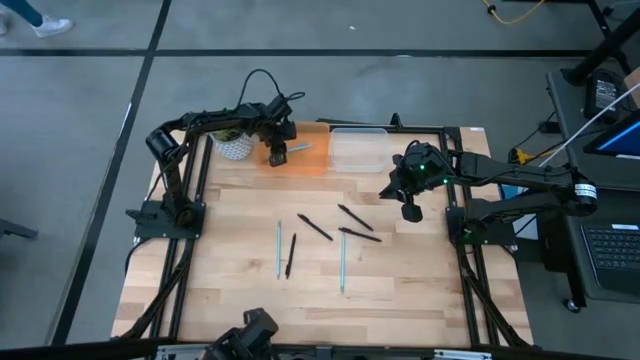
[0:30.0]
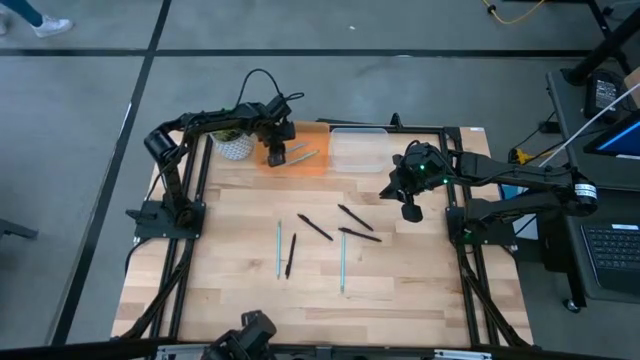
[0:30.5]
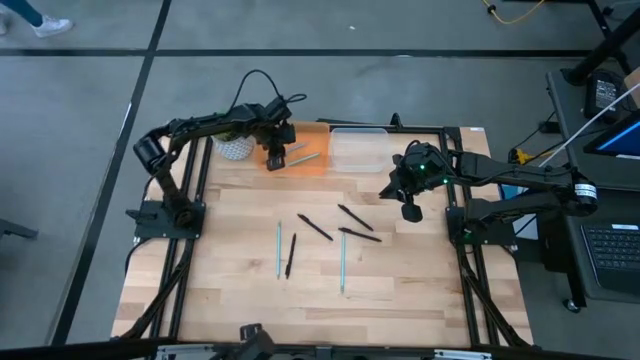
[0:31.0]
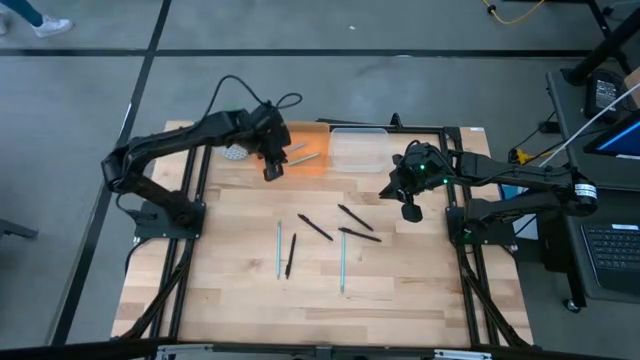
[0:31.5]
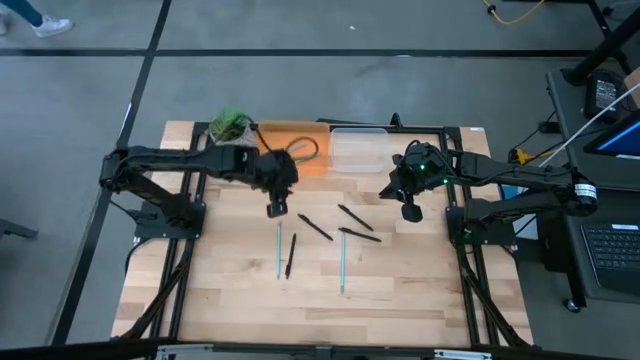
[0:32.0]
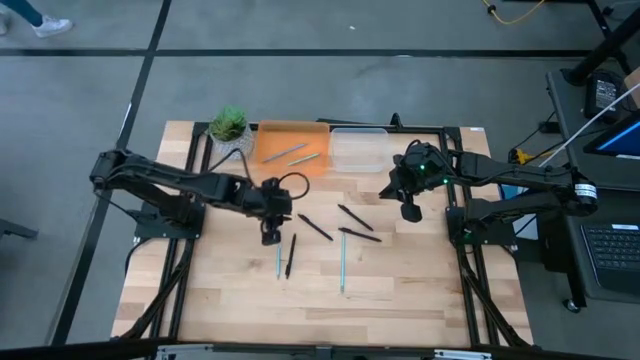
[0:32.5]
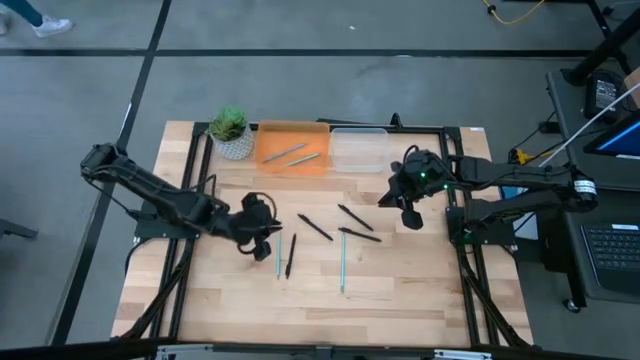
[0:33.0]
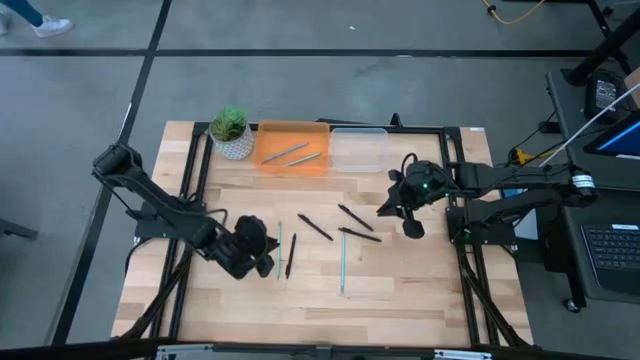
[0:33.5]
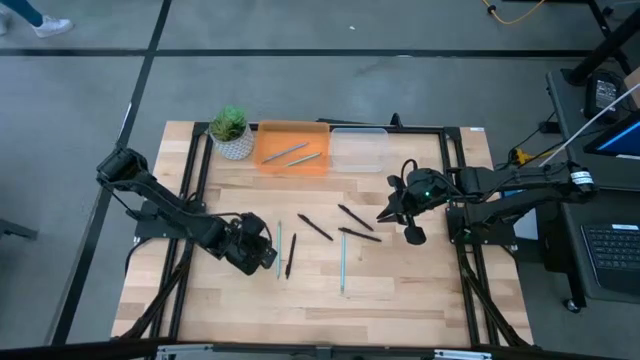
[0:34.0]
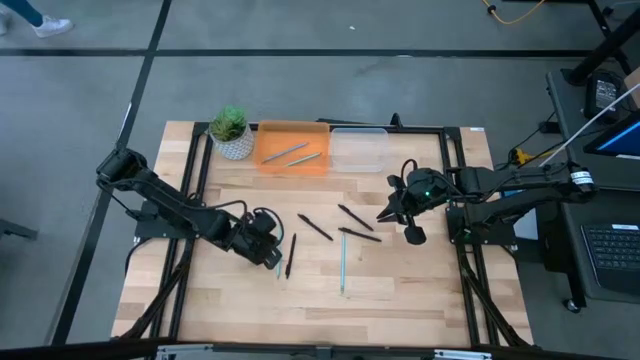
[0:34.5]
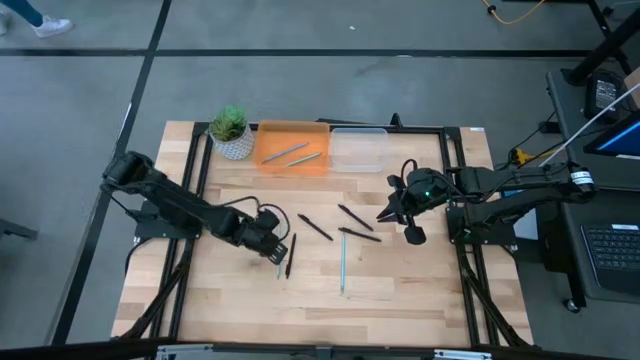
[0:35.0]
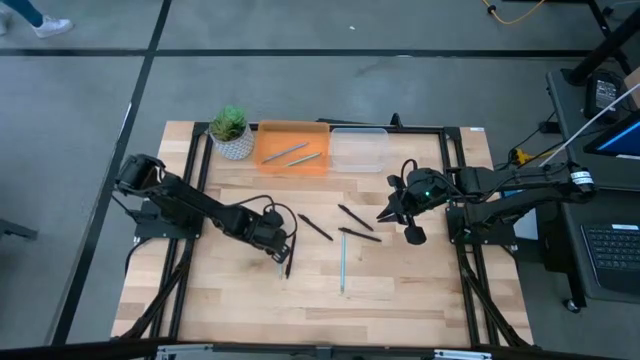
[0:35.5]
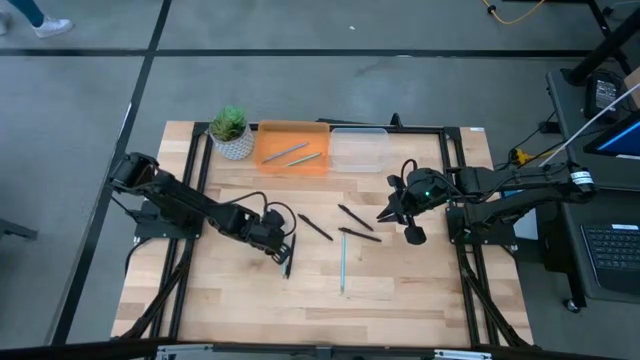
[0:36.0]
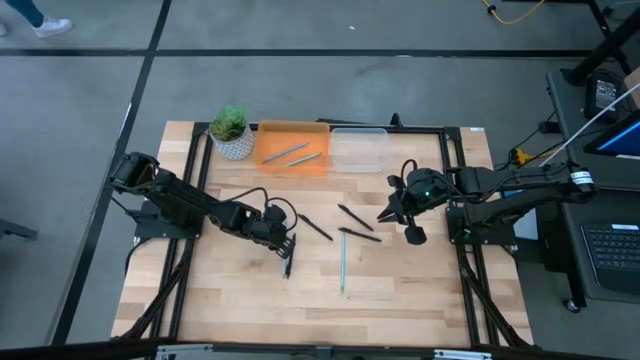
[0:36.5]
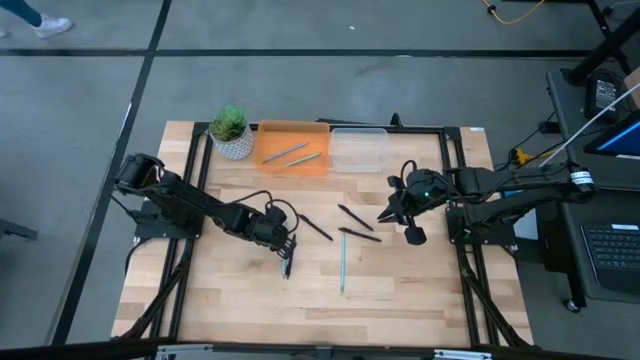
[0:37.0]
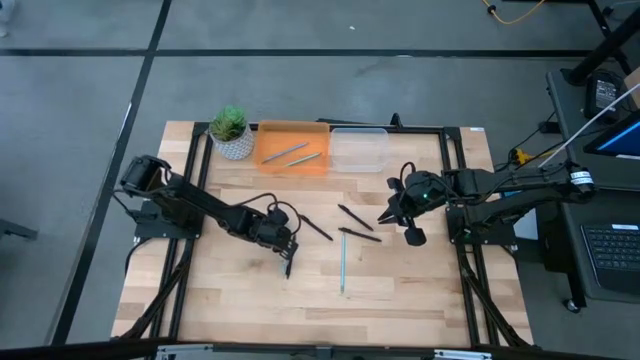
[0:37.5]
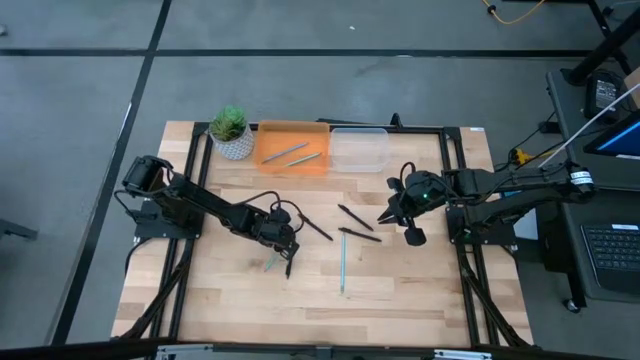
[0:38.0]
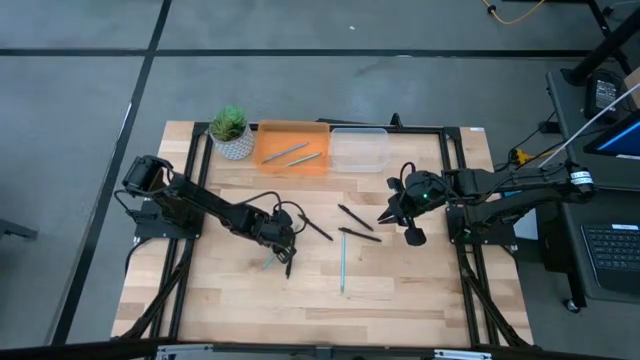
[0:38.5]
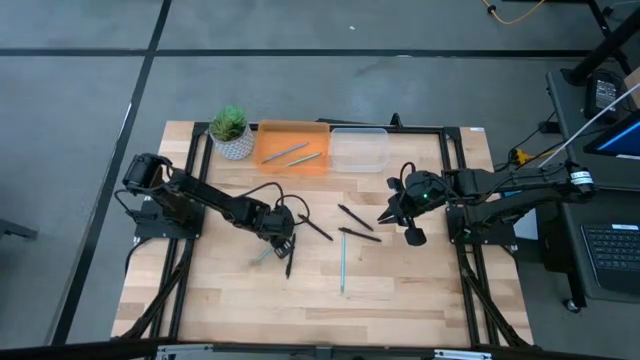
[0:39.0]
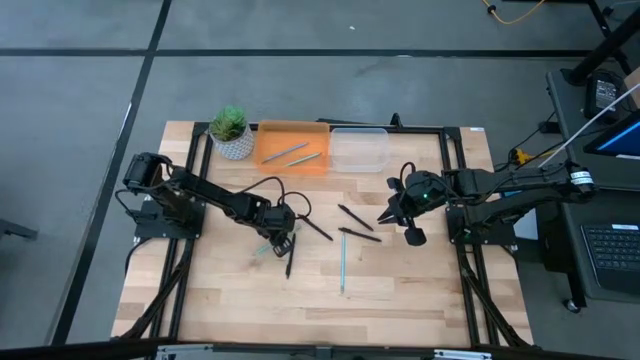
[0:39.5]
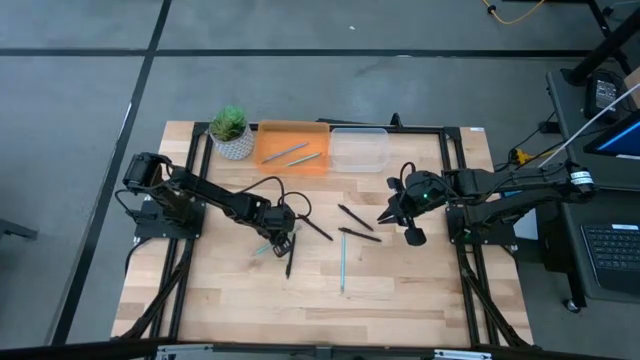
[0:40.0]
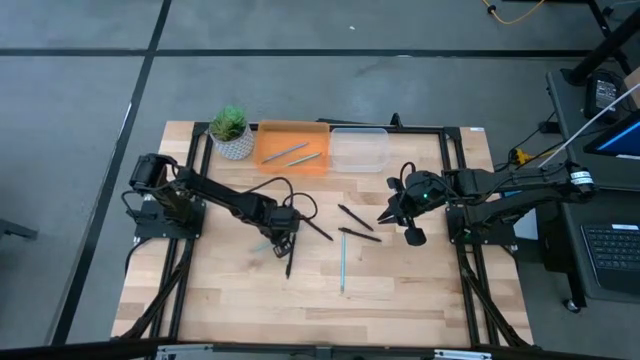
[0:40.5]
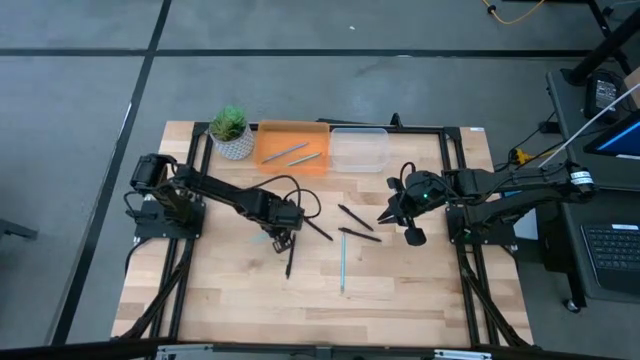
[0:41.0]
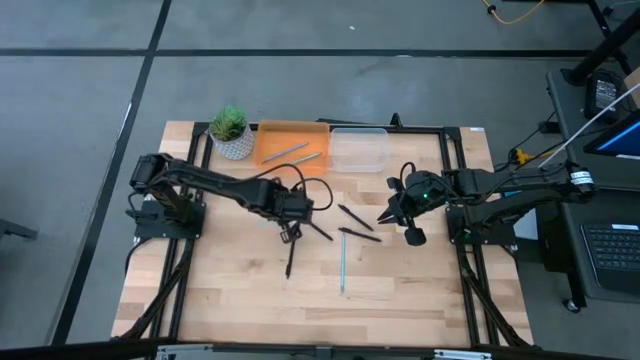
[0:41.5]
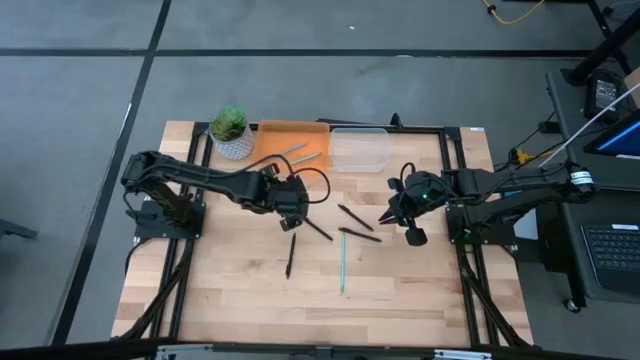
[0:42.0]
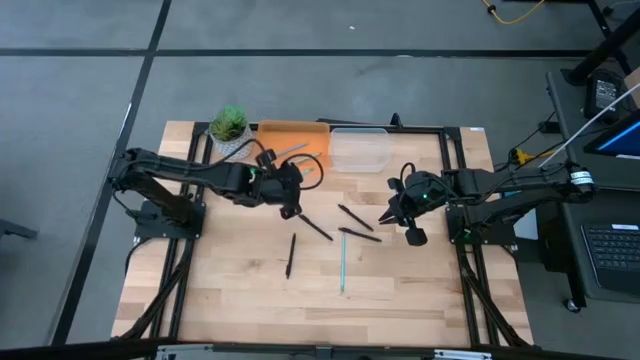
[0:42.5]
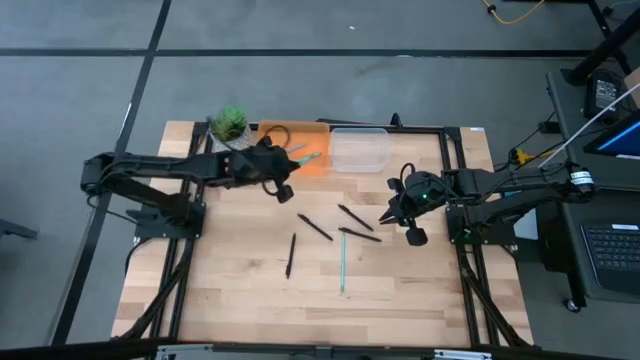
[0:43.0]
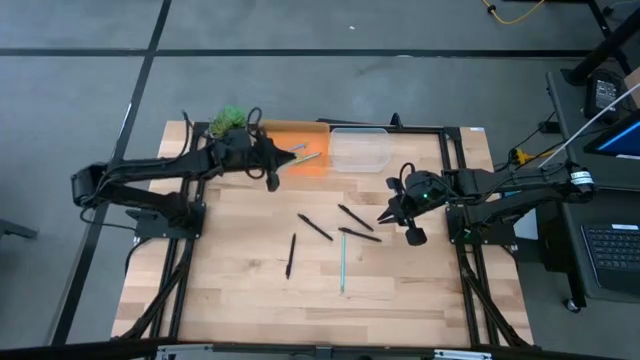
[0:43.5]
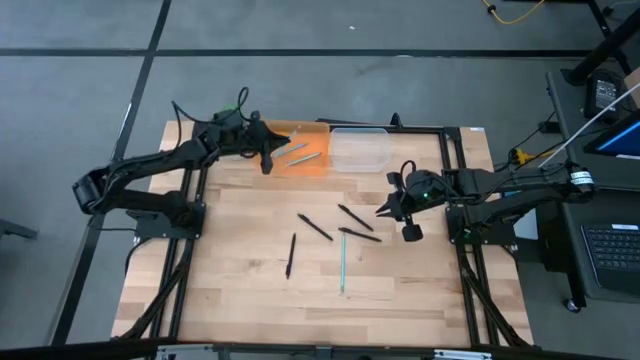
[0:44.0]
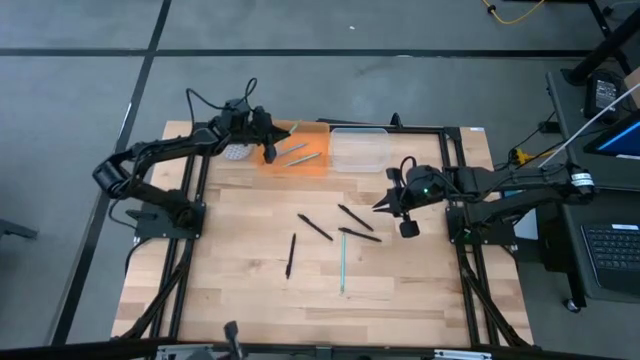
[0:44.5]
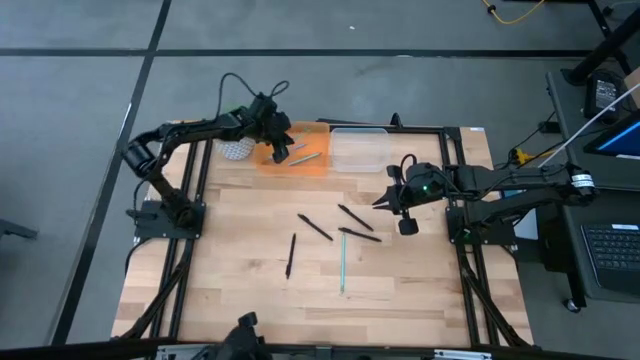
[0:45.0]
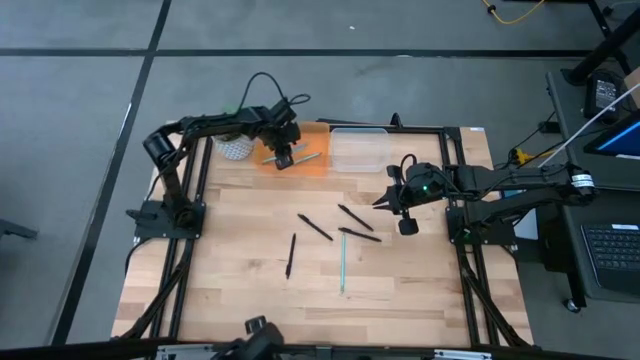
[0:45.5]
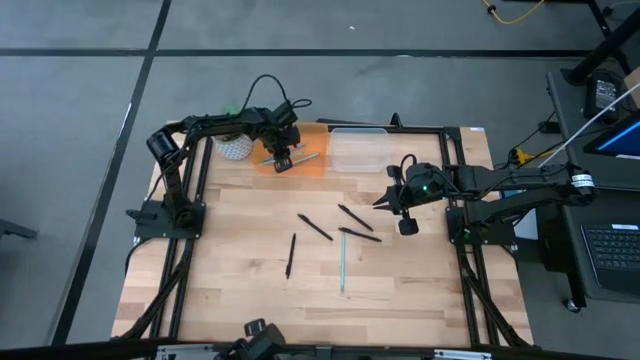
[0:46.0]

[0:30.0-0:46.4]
Task: Sort pens & pencils
Put the light blue pencil into the orange bin

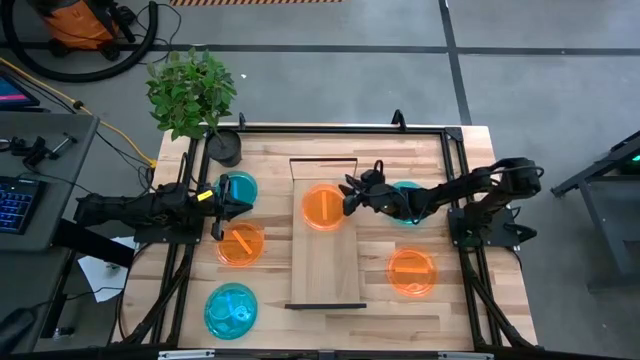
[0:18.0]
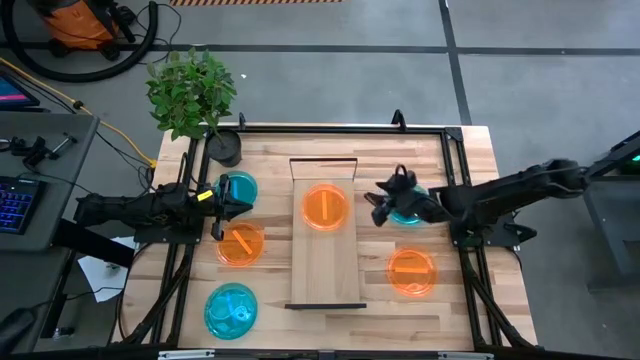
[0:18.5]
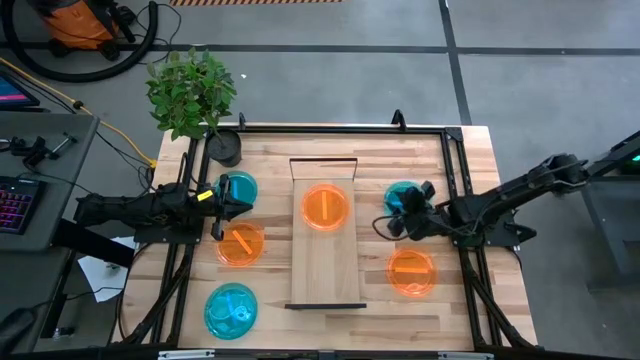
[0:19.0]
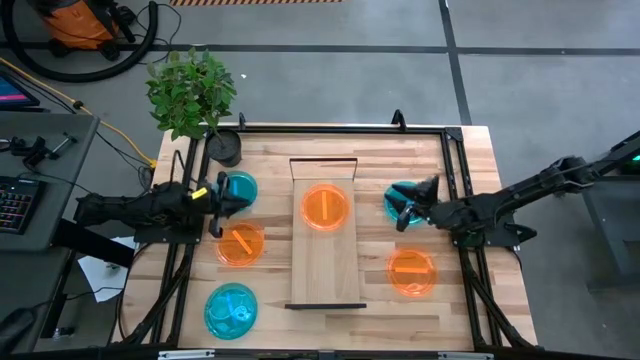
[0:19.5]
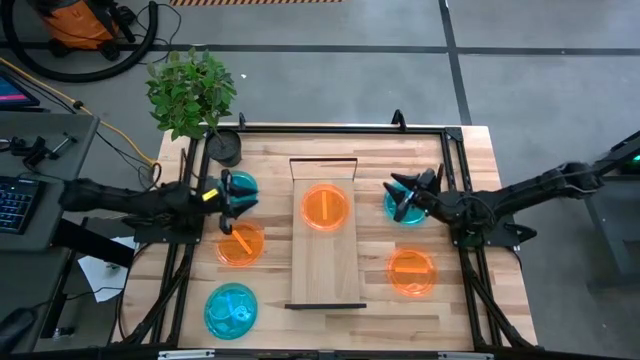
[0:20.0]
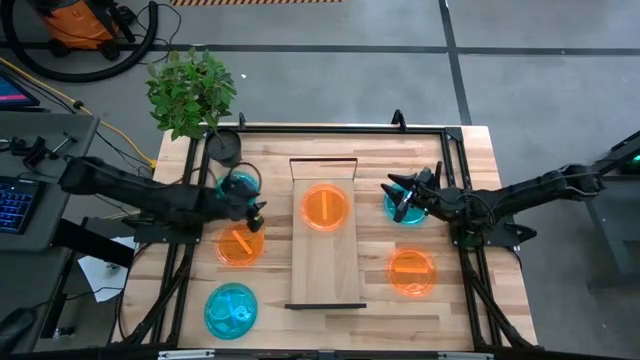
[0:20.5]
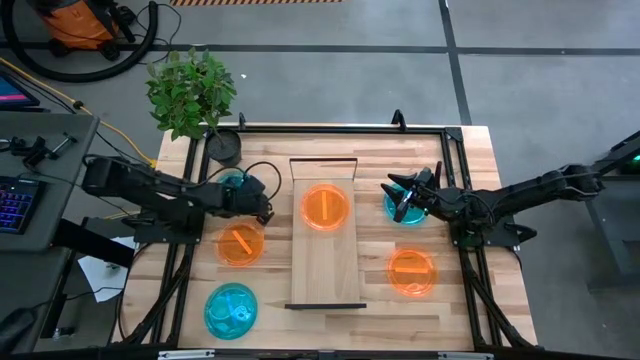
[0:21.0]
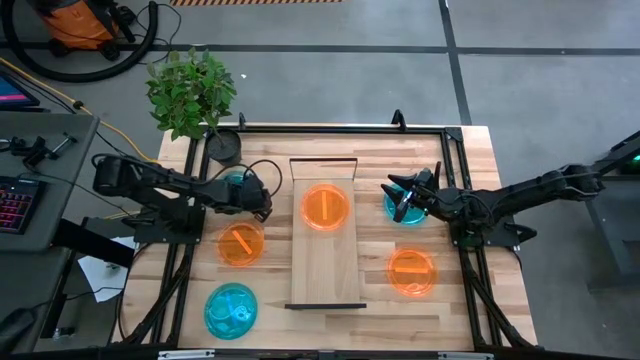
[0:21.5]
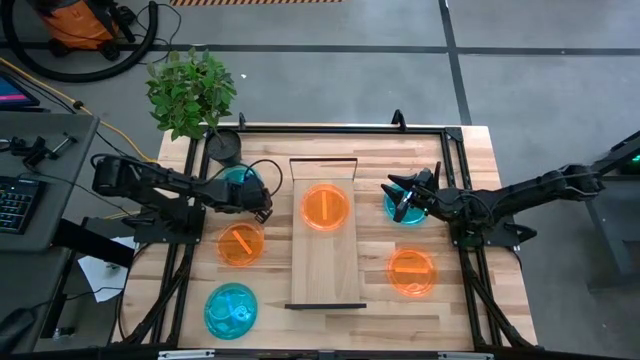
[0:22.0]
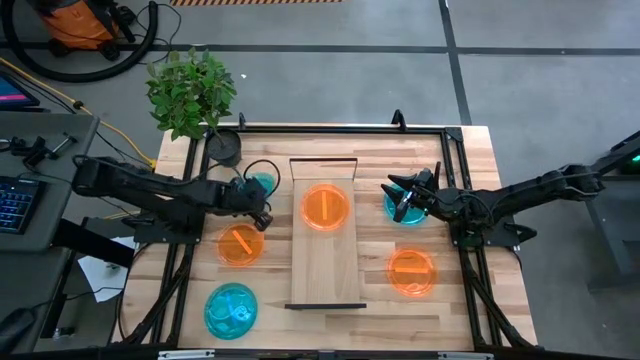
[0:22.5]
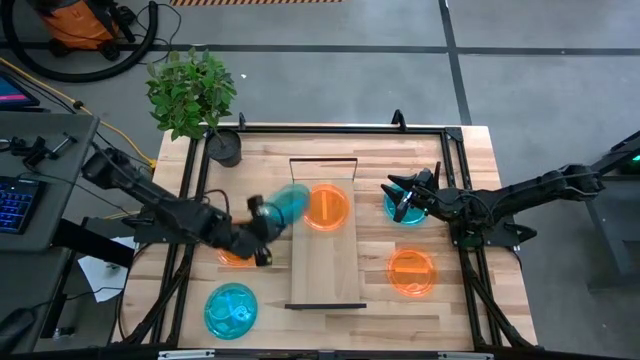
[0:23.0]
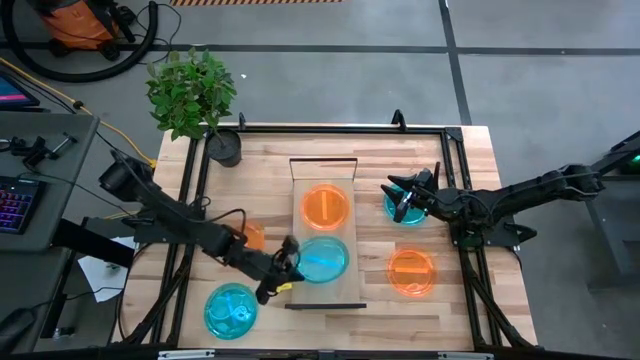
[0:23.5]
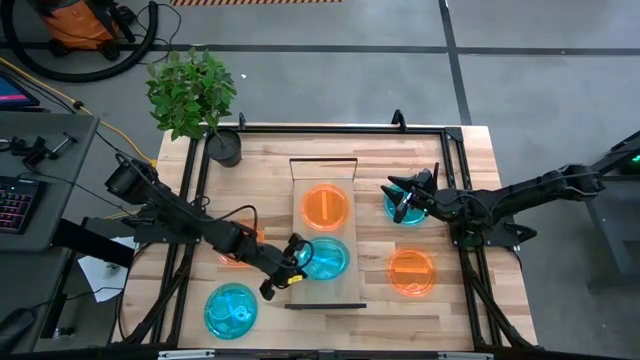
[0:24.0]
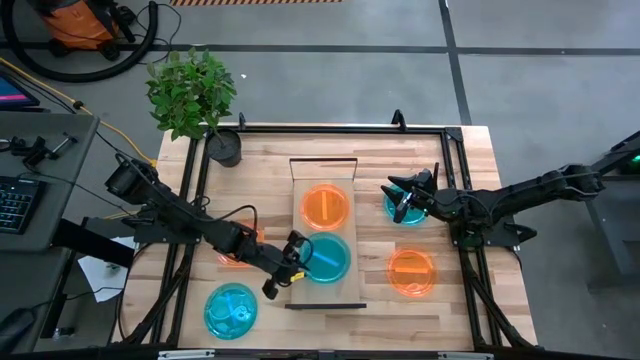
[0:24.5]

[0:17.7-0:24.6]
Task: Place and stack plates onto a shelf
Put the top left blue plate on the shelf
